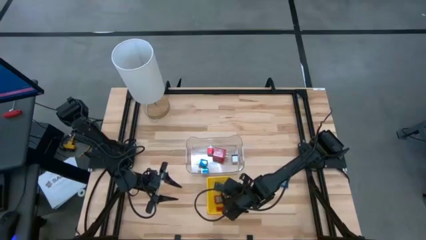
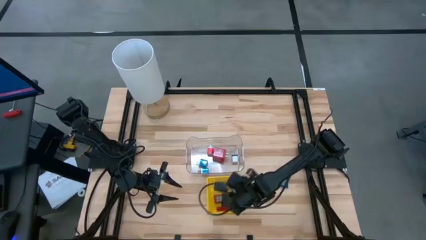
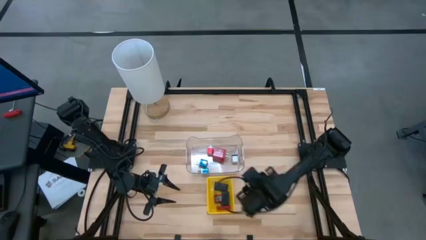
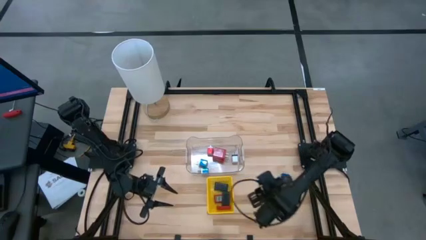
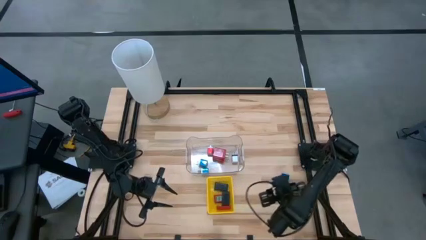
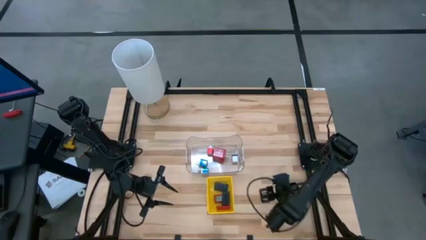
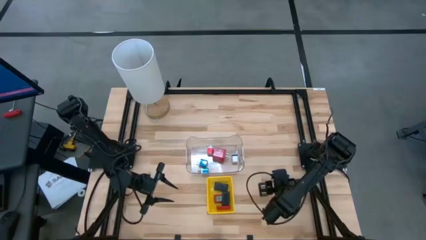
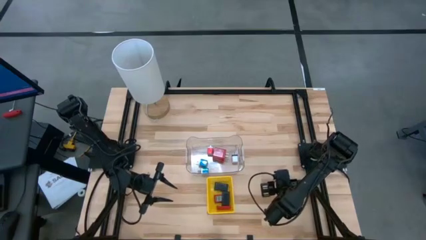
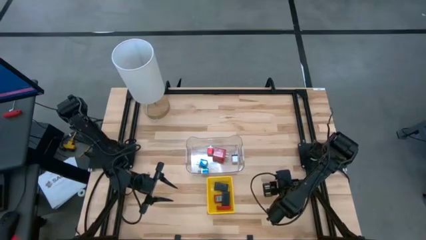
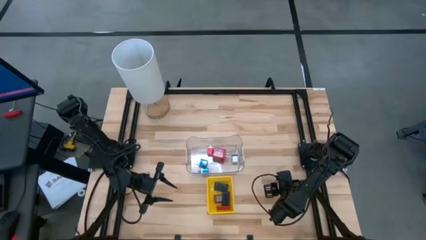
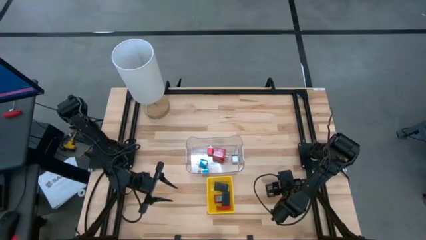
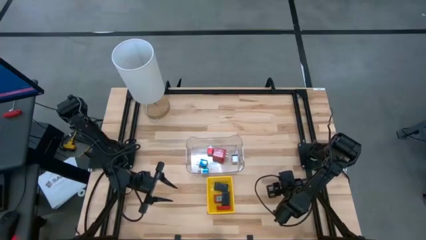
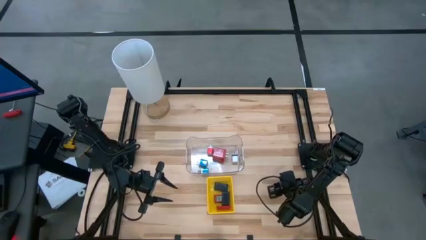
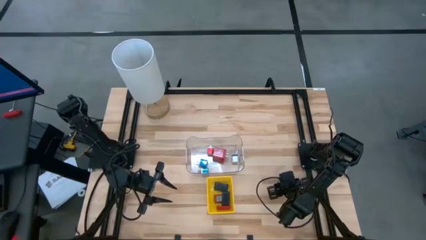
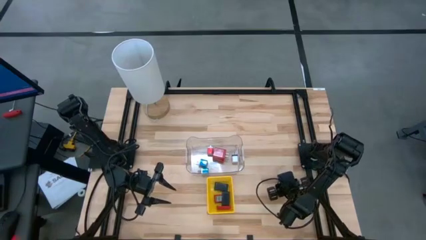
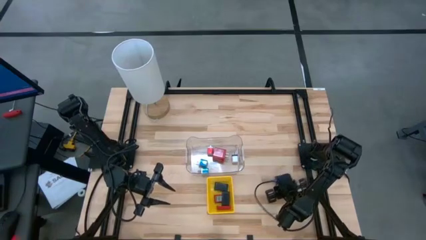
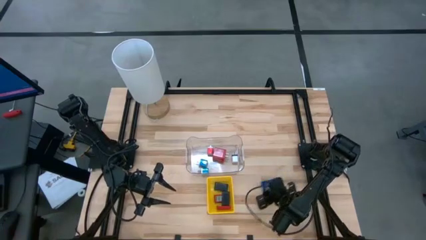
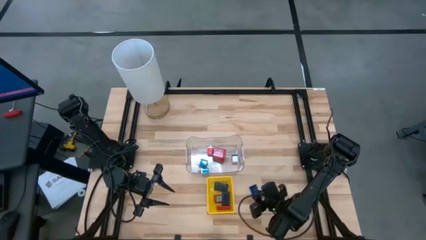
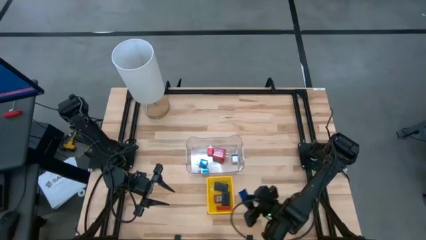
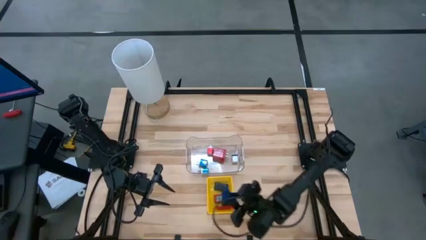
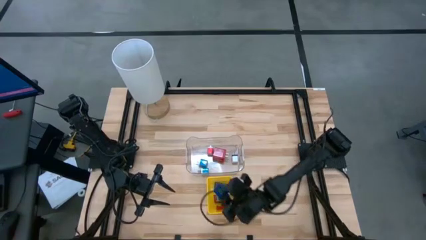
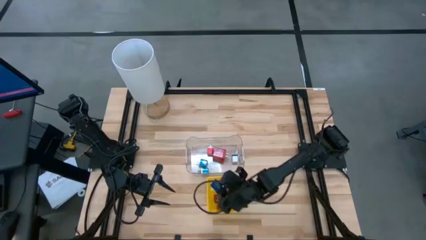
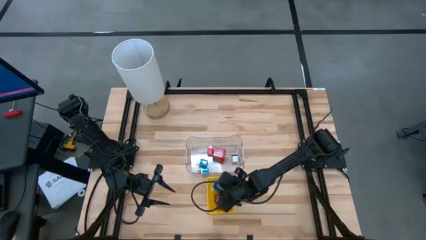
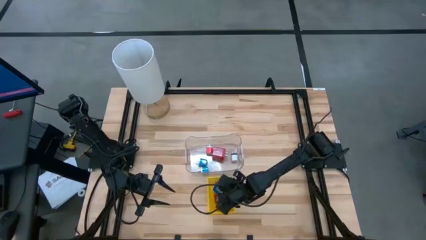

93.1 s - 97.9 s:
Task: Pick & Place Office items
Put the dark blue digital clock into the yellow bin

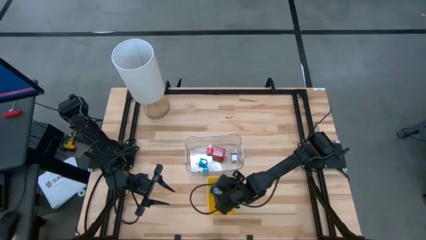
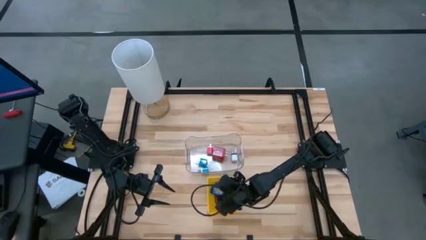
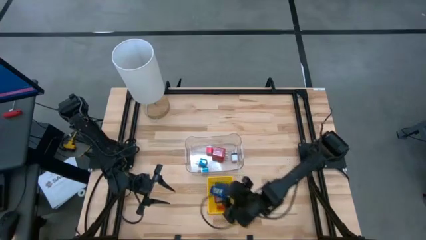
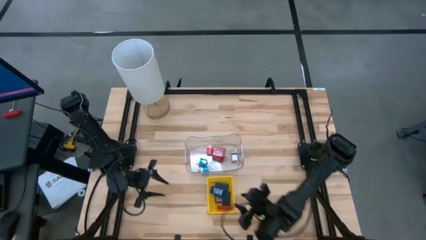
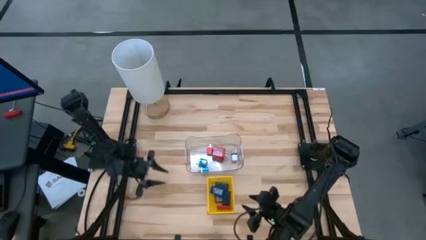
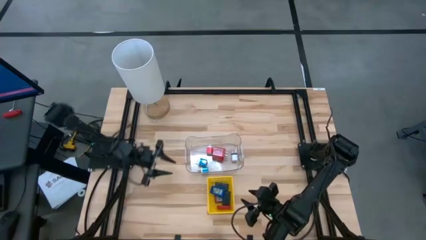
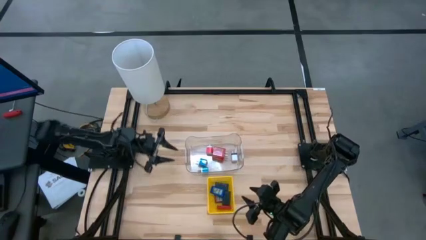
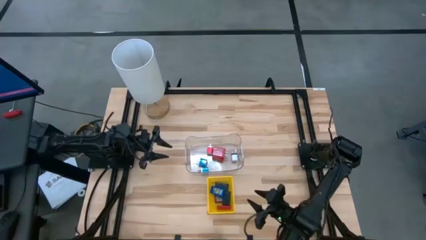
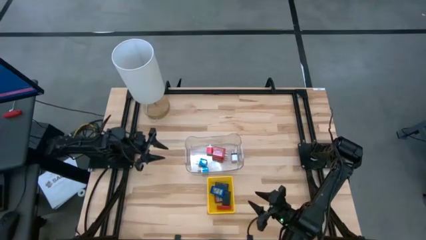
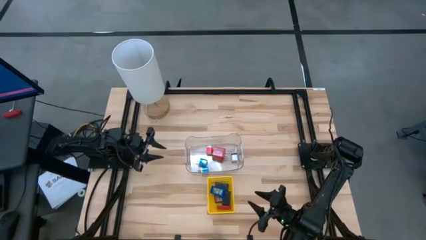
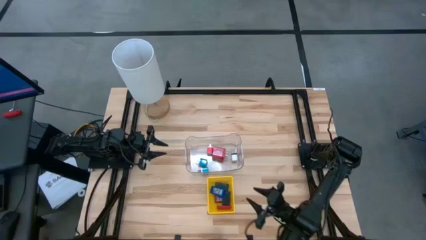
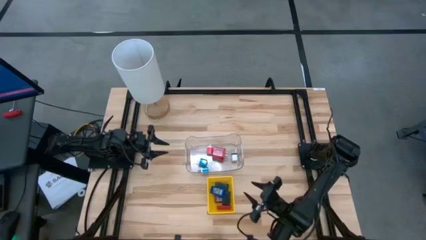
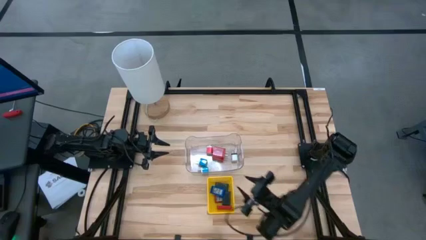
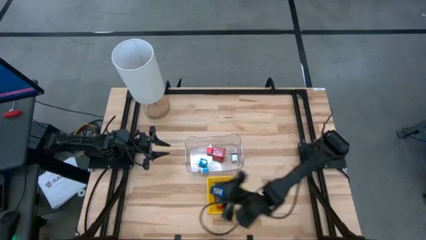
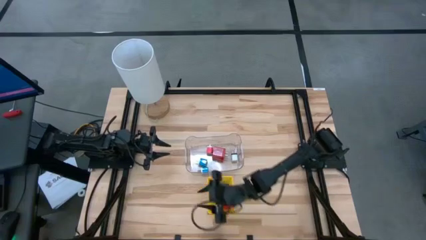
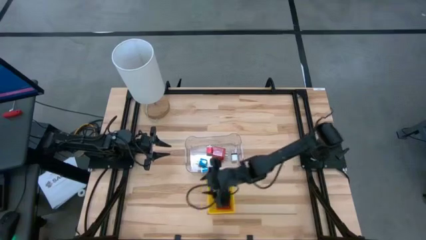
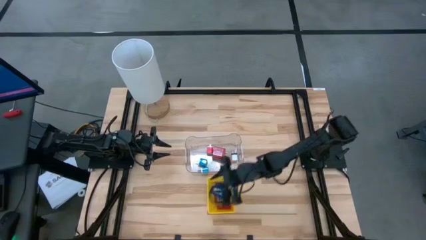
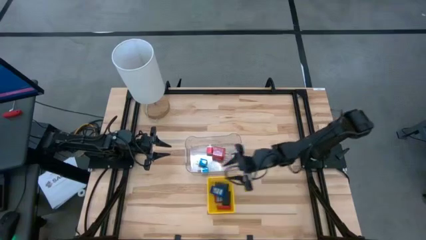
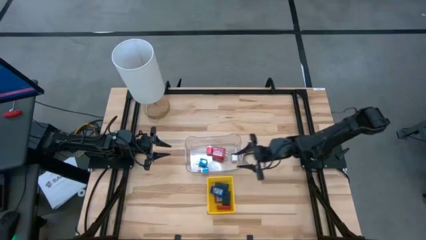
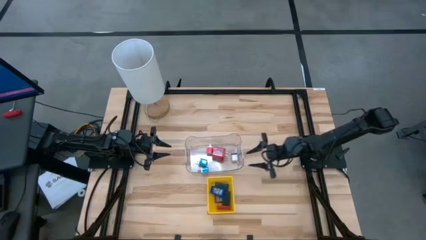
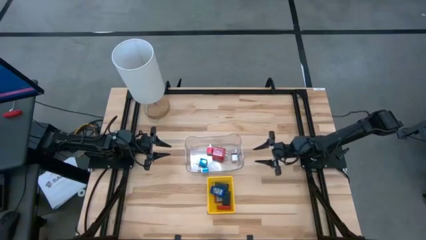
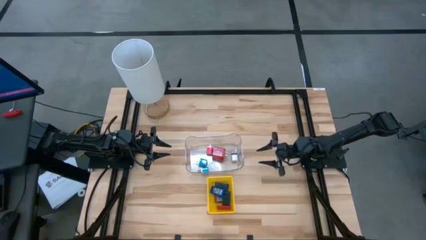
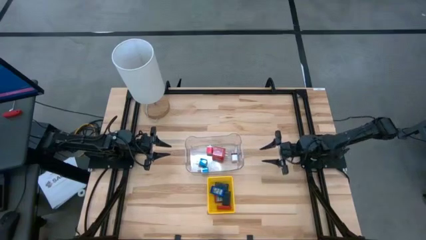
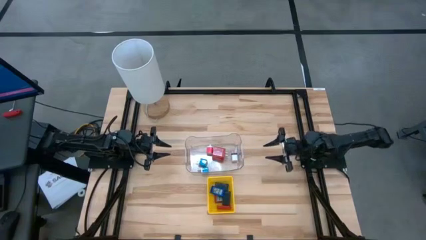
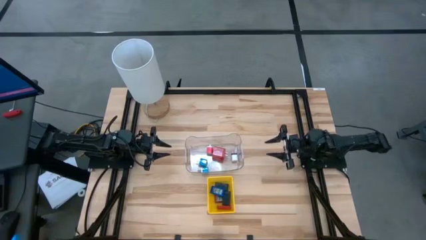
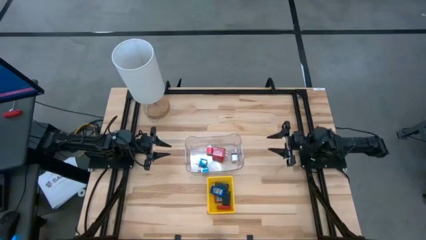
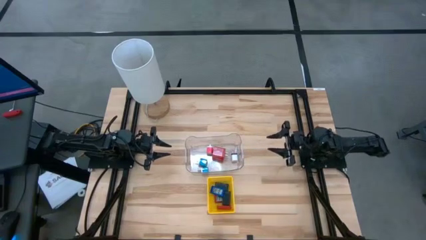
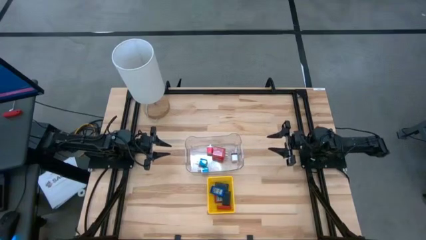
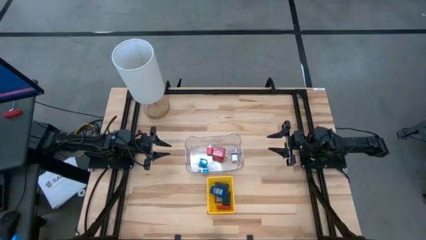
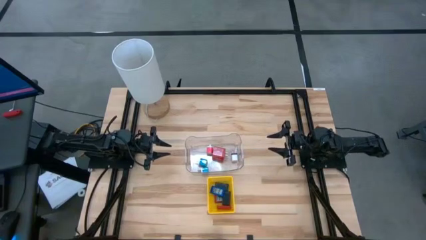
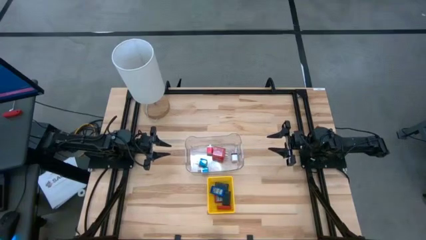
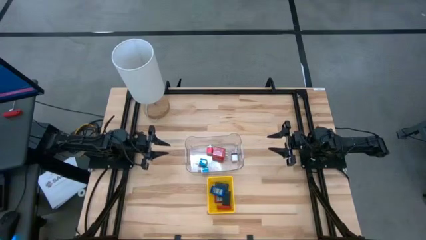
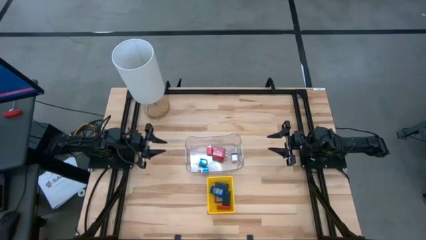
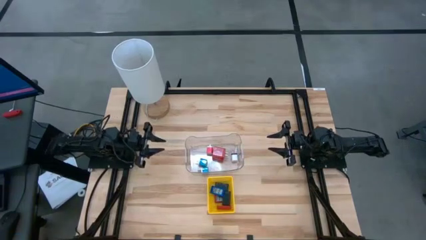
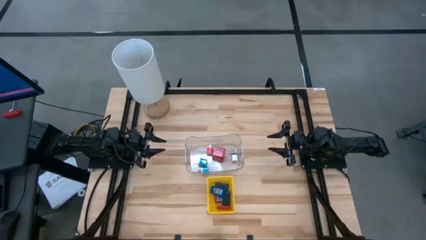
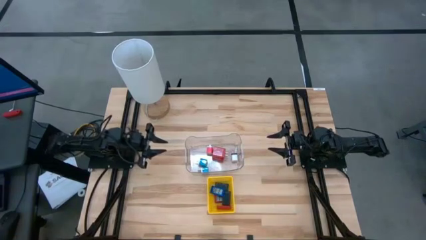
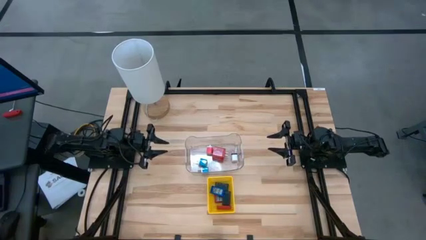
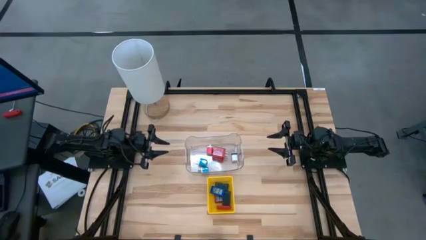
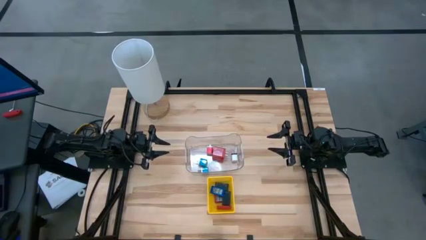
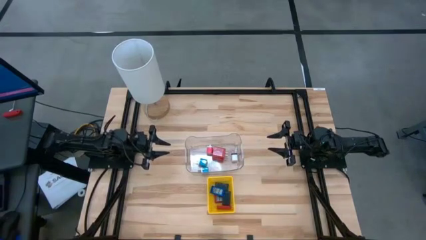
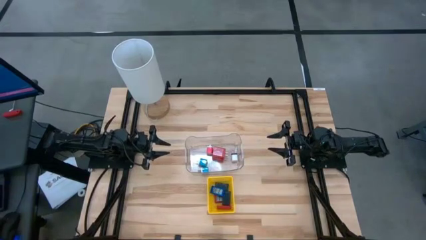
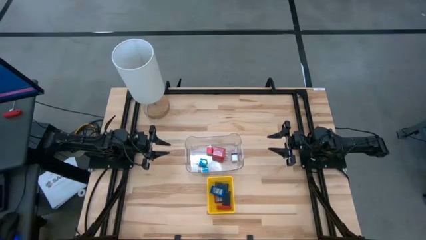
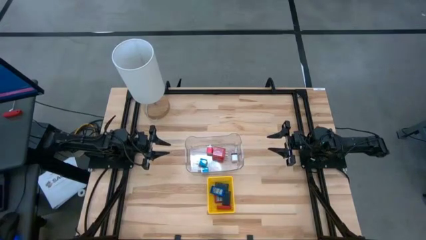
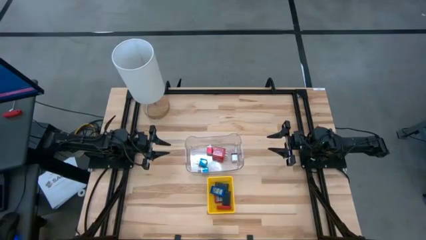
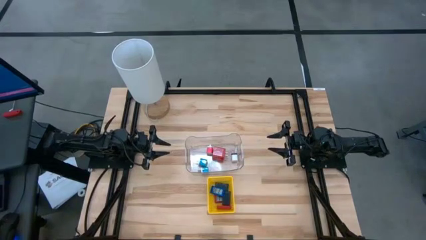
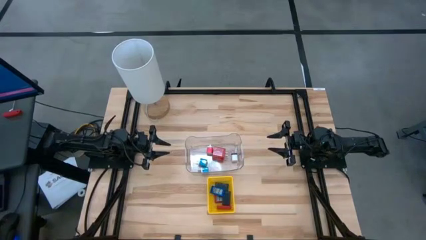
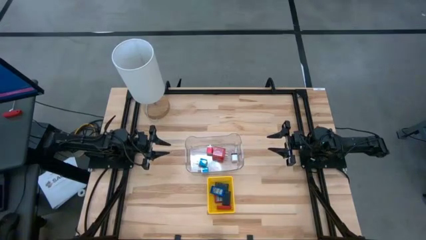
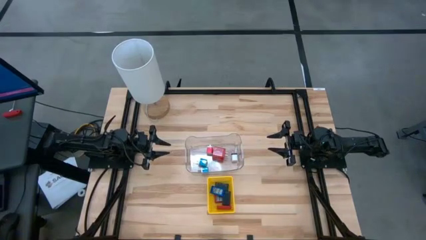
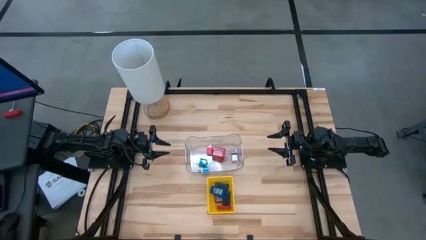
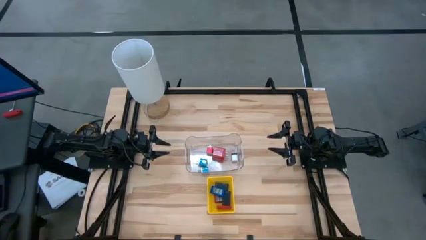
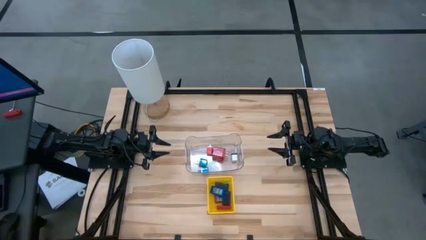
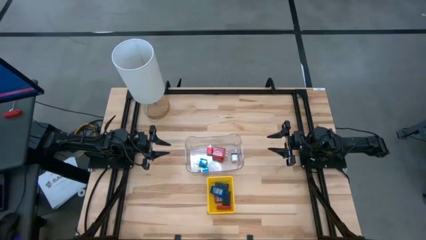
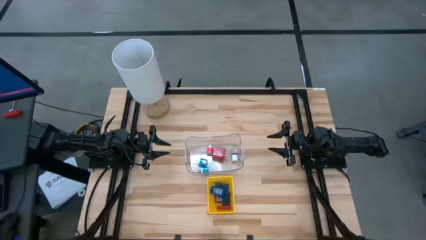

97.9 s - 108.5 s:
Return to Home Position
